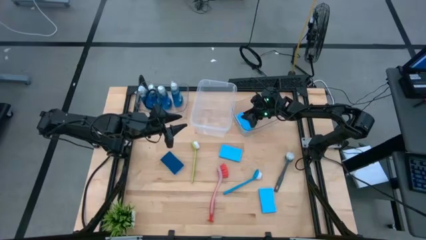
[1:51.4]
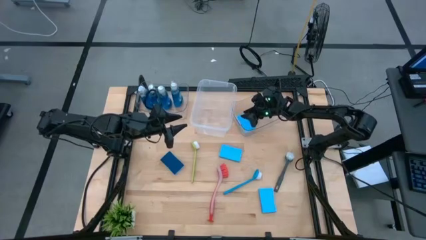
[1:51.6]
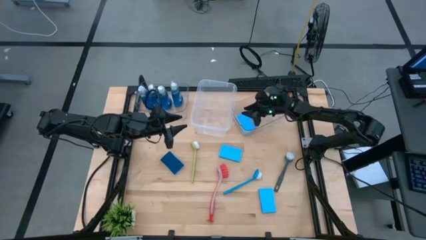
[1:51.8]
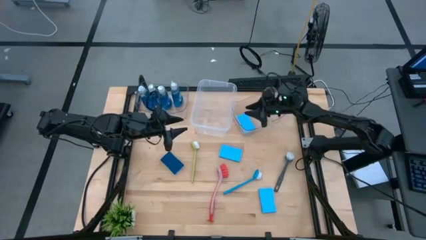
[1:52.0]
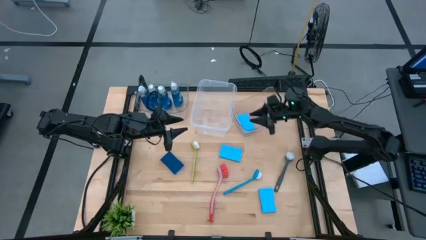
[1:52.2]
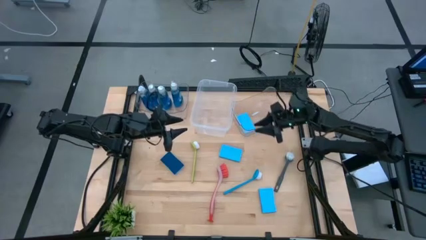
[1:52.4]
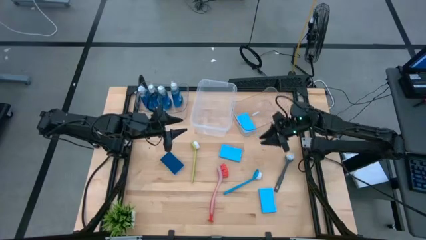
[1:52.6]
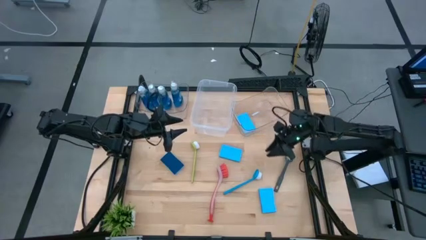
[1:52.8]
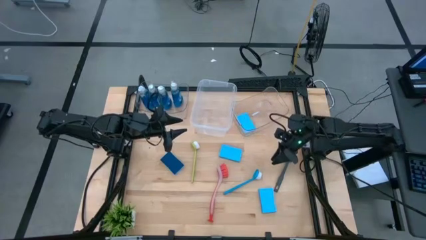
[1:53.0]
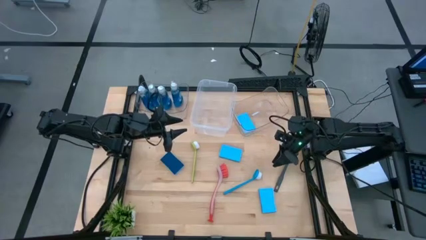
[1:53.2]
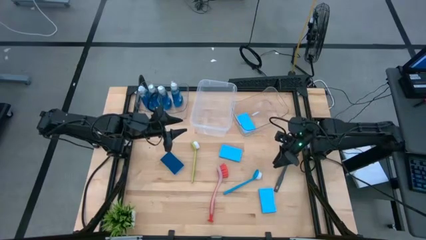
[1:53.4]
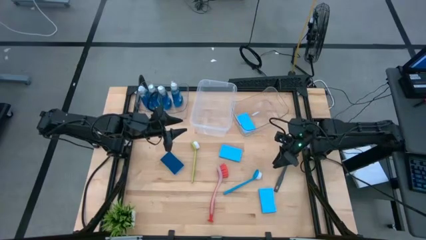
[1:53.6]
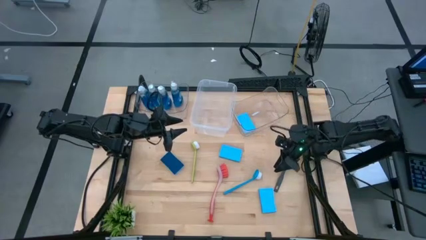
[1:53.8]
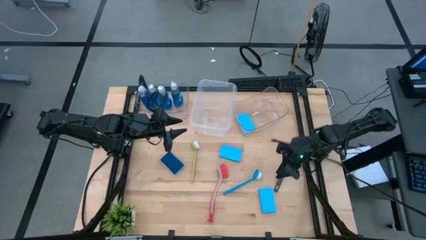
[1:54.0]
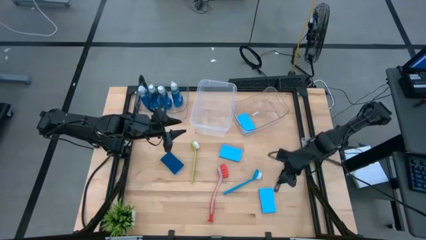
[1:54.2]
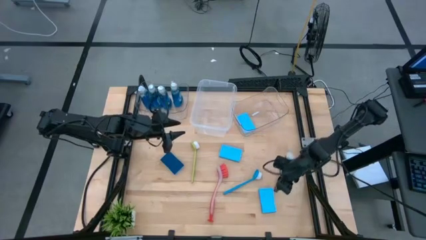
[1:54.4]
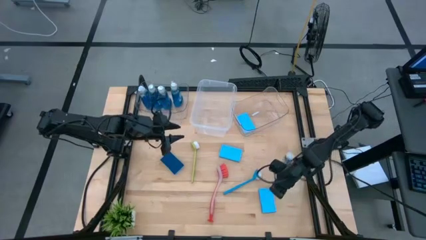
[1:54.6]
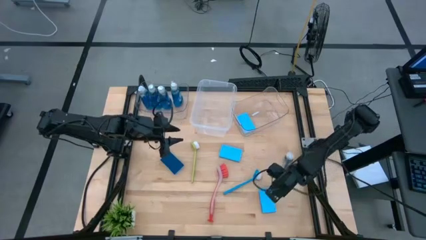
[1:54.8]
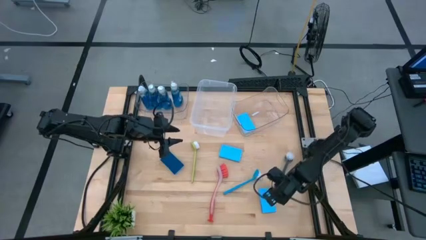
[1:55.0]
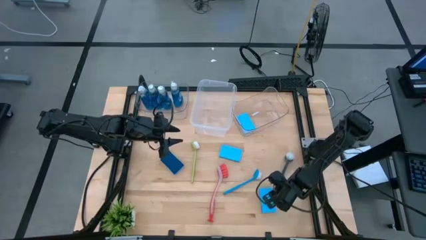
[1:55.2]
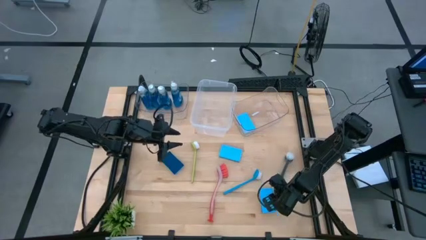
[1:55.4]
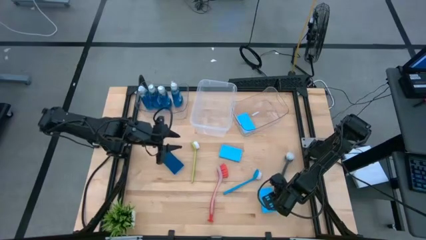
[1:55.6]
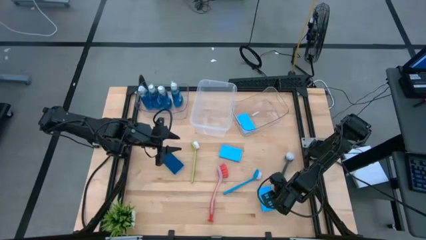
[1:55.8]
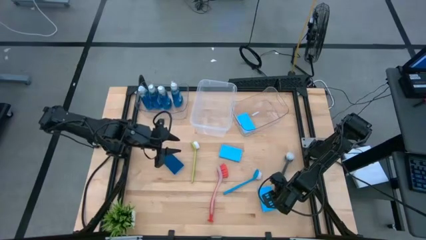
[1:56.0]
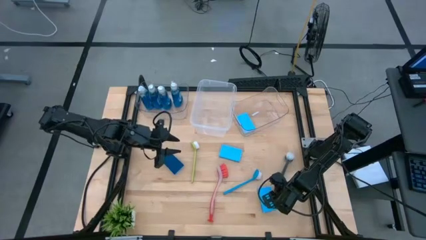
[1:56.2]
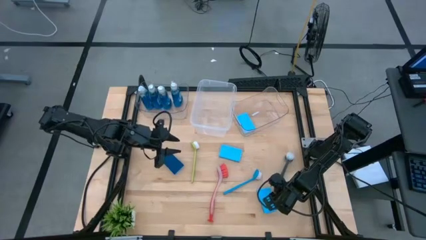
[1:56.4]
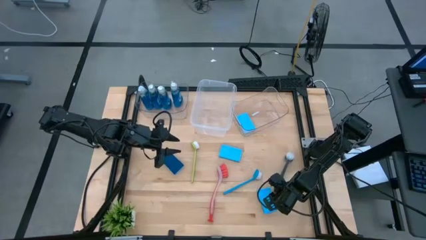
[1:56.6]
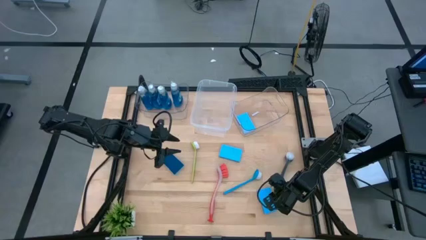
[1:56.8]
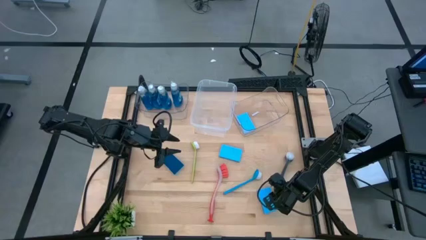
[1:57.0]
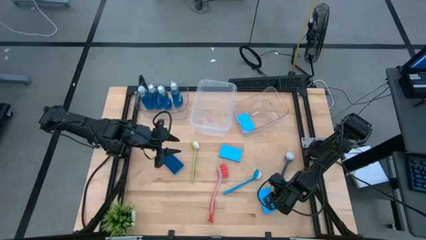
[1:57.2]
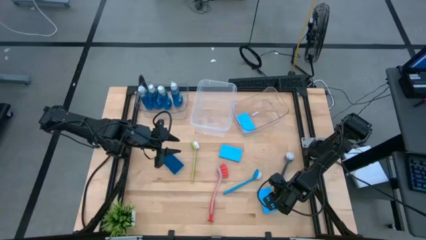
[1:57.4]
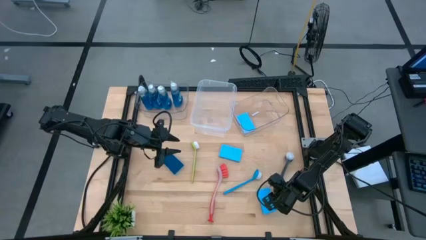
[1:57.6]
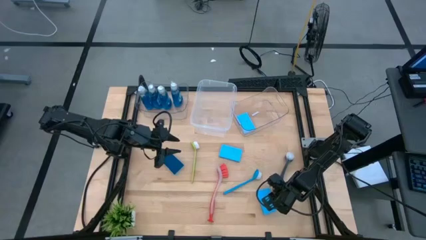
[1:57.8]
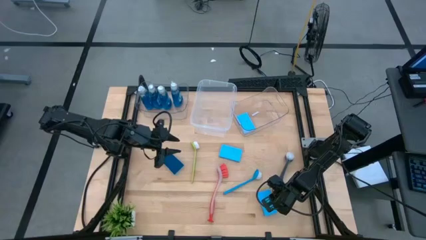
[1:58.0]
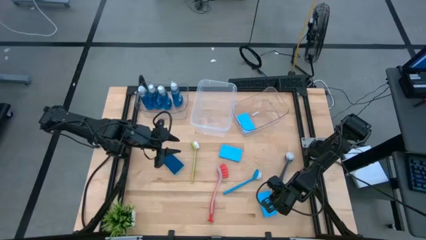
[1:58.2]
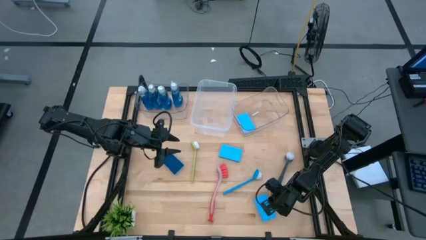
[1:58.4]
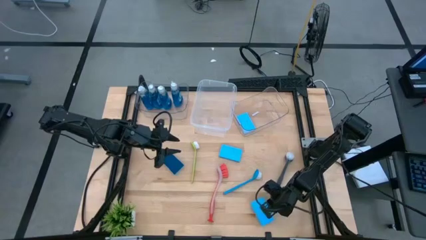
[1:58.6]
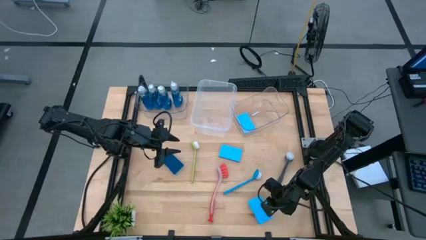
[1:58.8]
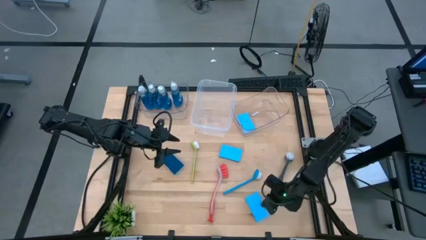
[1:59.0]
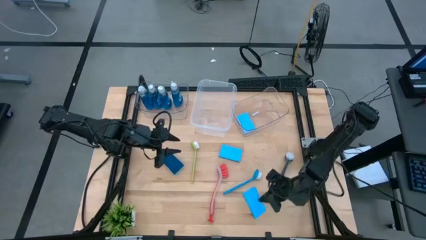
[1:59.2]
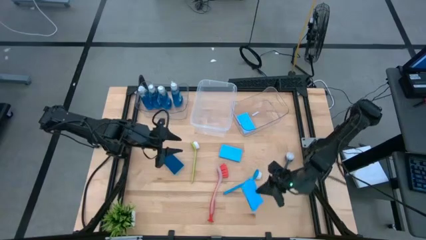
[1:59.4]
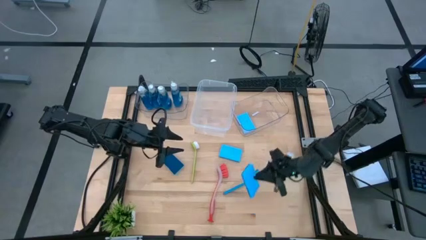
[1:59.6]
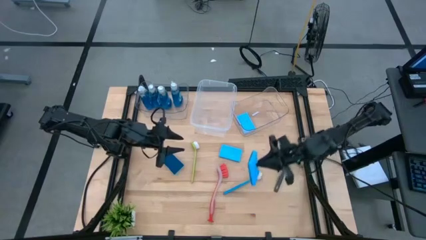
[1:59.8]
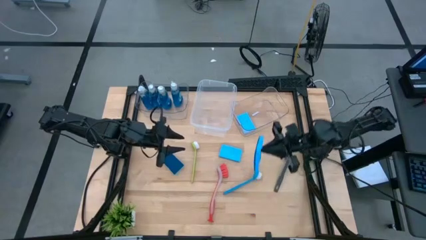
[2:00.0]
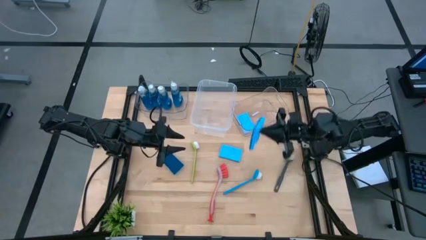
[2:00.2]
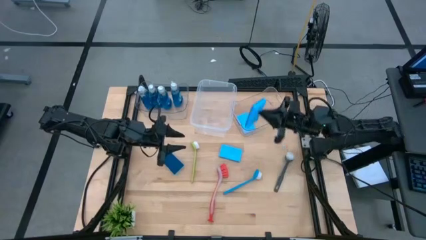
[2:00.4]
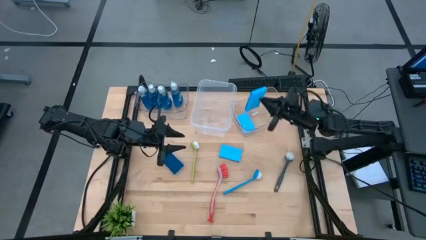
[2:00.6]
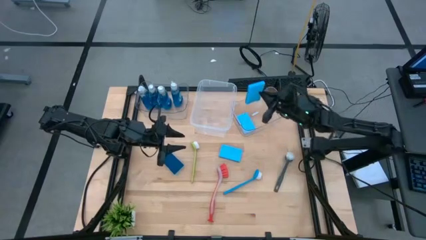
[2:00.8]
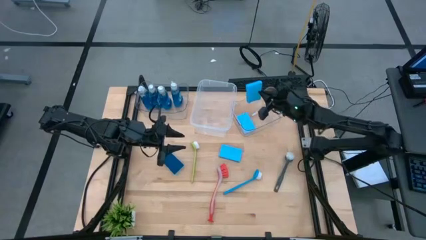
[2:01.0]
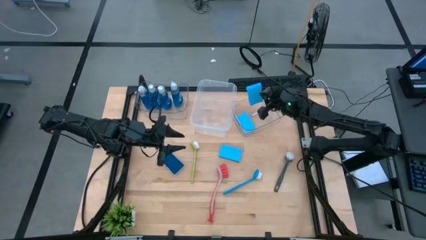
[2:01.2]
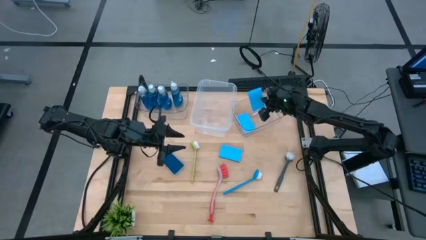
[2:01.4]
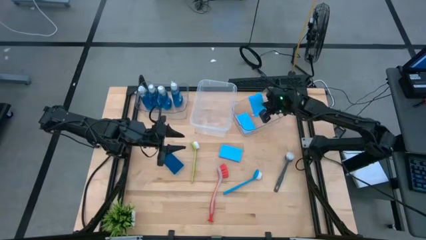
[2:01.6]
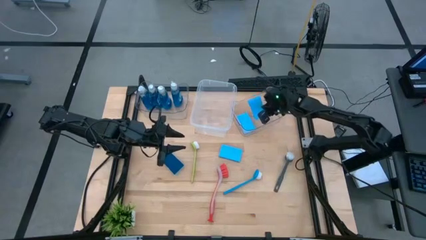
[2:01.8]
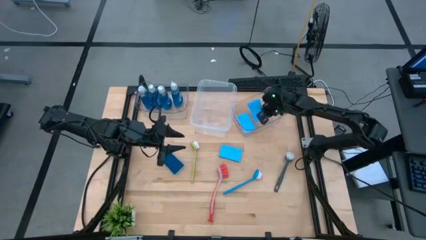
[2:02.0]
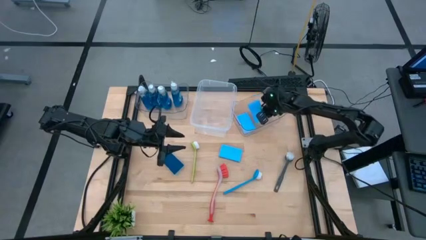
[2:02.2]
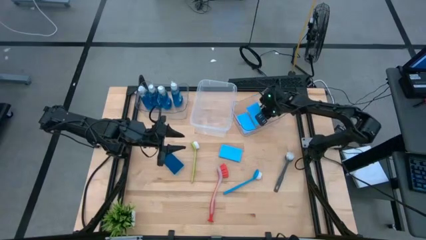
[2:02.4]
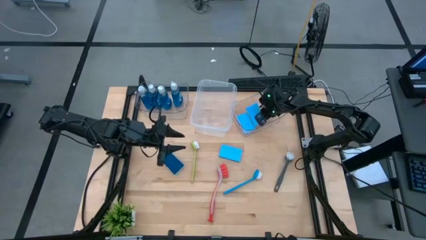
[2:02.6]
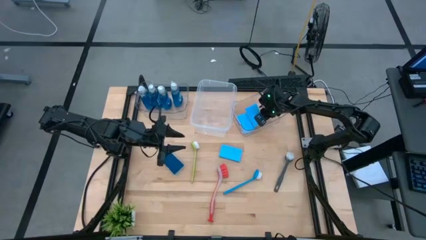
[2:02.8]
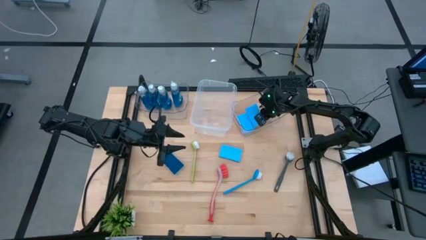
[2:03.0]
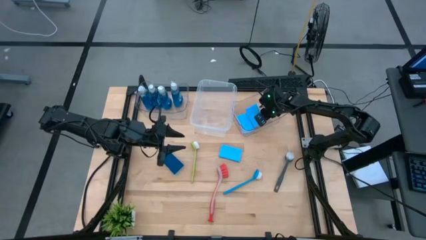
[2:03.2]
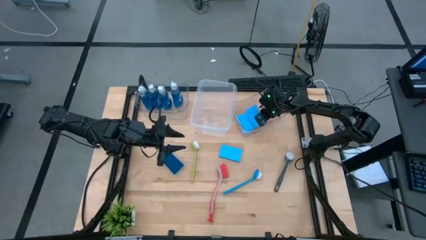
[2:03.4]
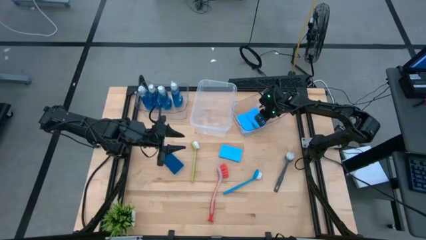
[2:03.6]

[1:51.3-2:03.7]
Task: Pick & Place Kitchen Sink Supplies
Put the sponge into the right transparent bin

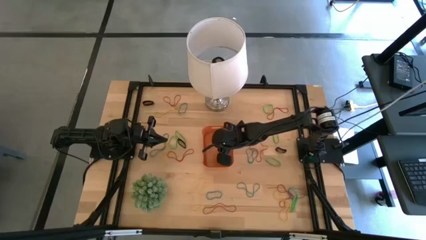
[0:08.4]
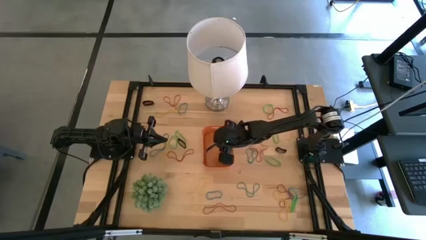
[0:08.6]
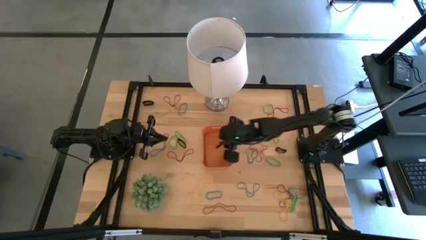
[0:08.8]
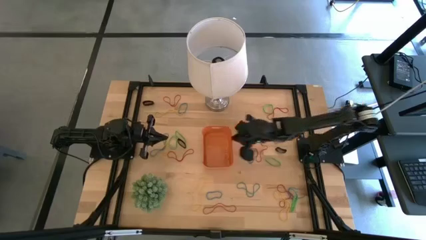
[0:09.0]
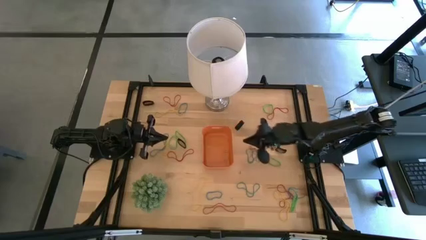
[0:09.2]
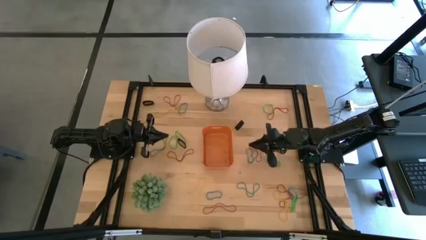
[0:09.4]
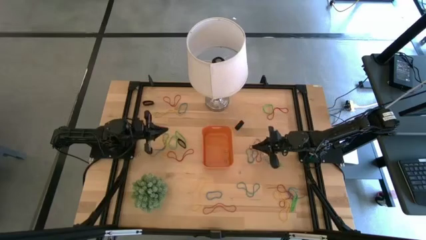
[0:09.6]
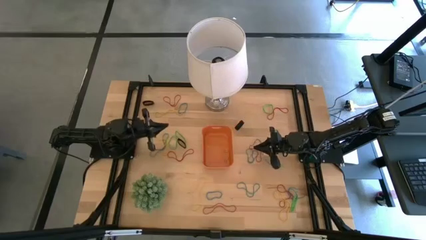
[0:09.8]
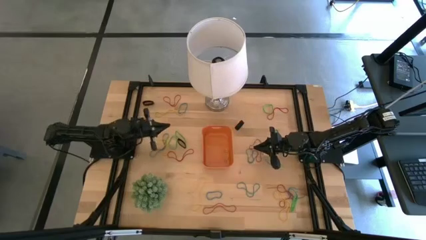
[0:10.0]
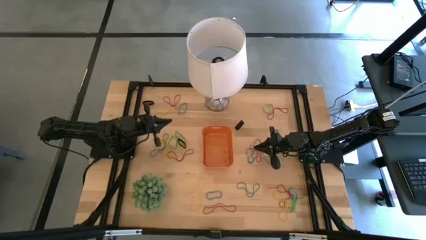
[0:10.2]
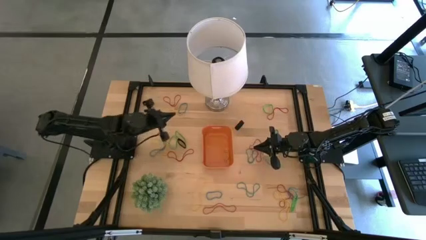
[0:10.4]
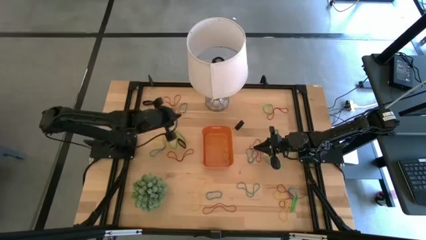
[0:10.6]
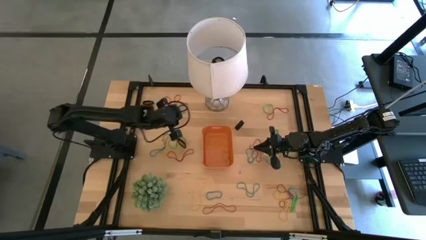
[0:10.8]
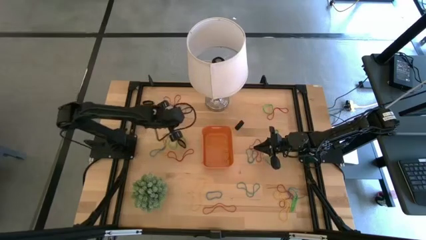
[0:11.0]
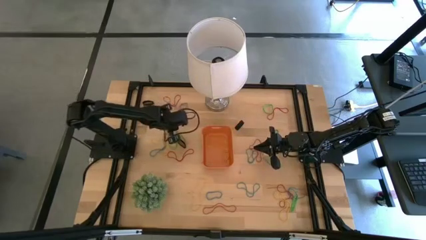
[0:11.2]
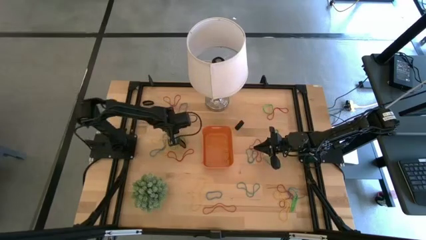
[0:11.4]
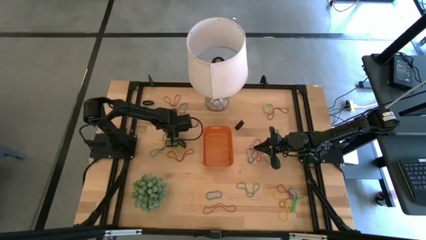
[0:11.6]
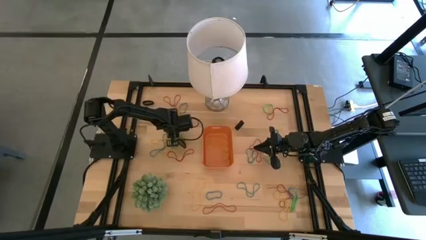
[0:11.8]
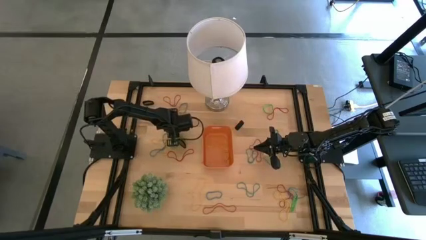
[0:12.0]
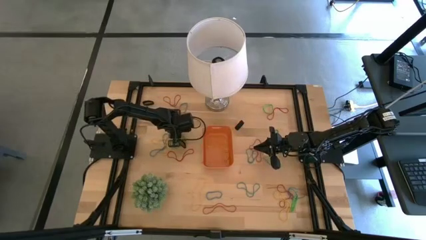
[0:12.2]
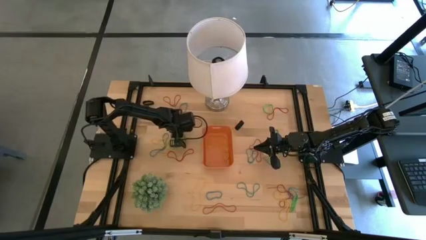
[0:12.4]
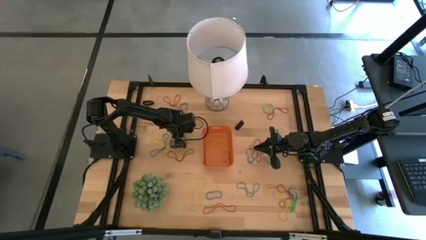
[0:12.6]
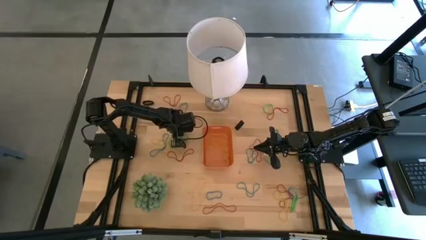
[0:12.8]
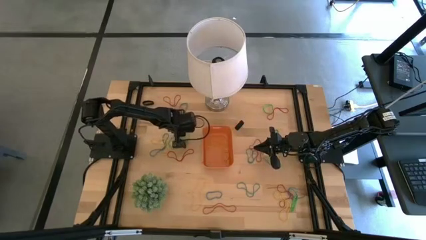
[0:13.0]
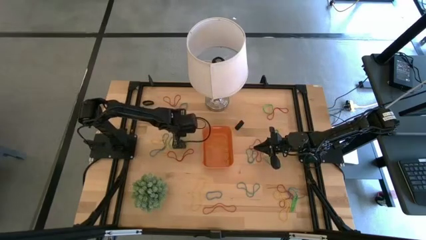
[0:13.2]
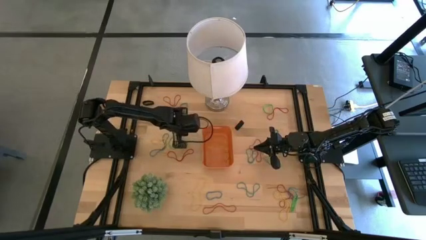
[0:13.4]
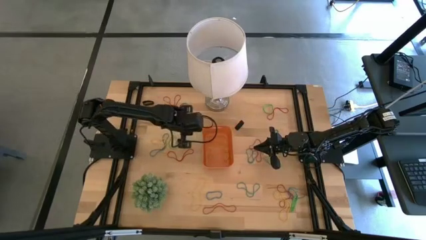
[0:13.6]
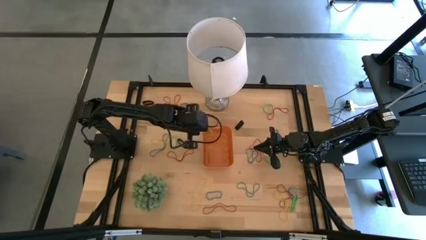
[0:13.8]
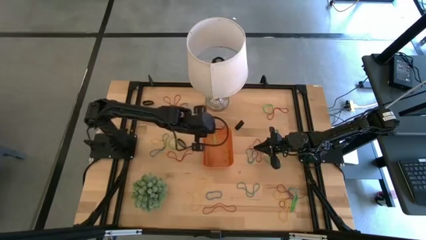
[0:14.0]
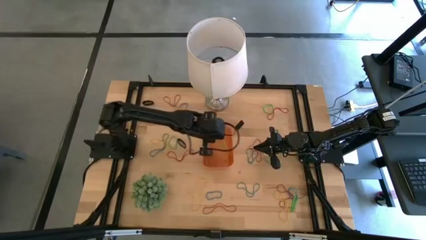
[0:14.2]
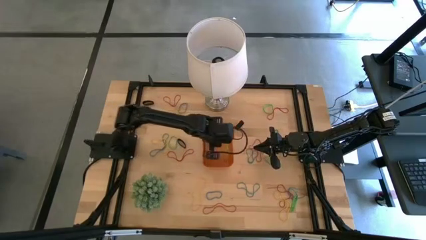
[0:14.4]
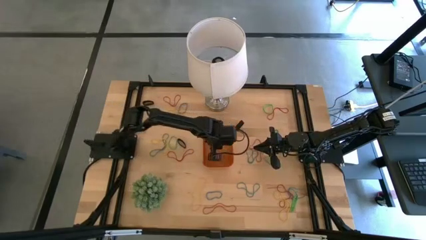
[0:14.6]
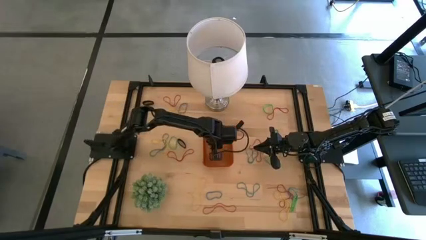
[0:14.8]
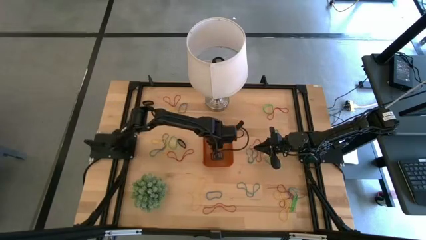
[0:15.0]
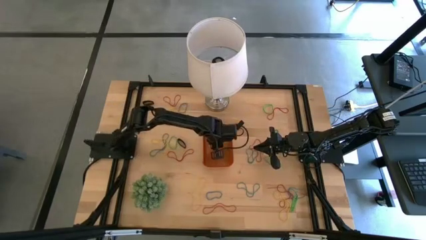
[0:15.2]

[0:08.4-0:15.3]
Task: Pick and place rubber bands into bin
Put the green rubber band into the orange bin
